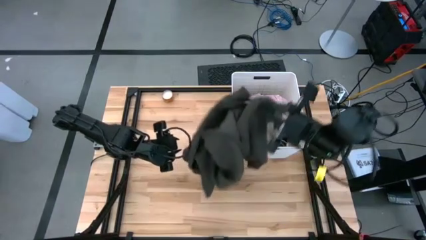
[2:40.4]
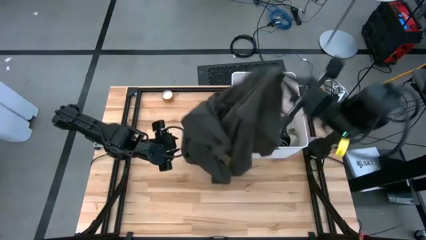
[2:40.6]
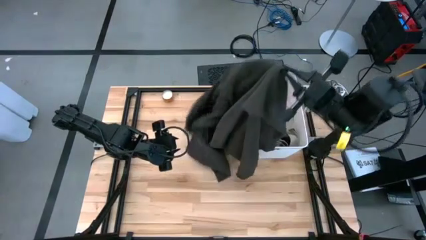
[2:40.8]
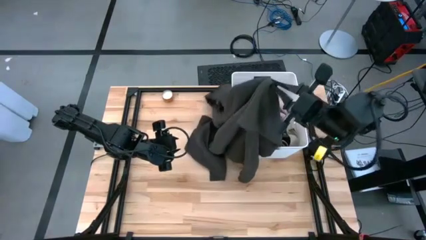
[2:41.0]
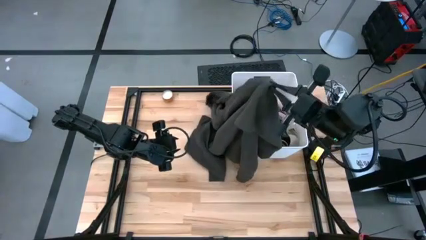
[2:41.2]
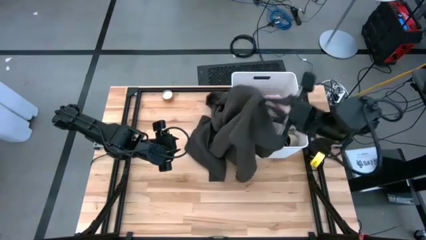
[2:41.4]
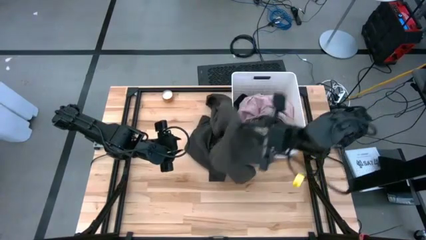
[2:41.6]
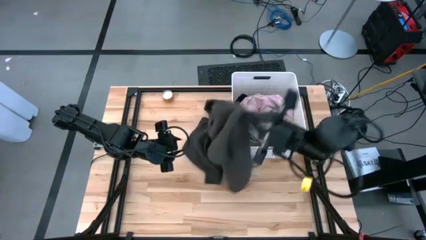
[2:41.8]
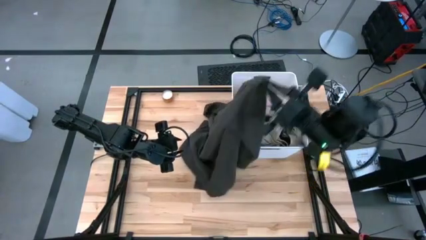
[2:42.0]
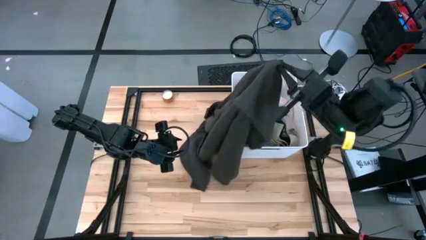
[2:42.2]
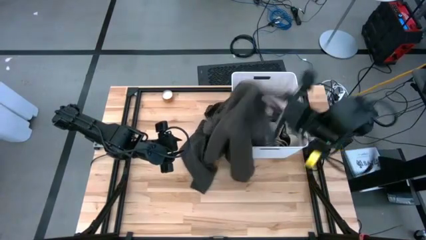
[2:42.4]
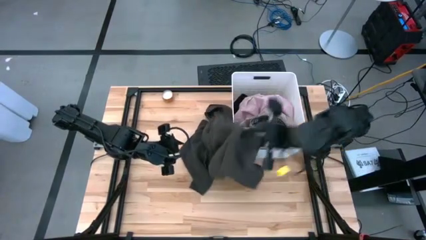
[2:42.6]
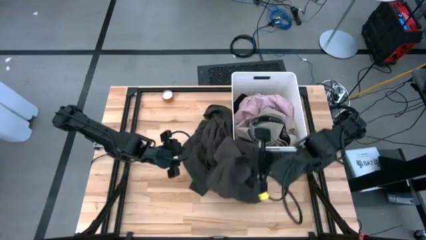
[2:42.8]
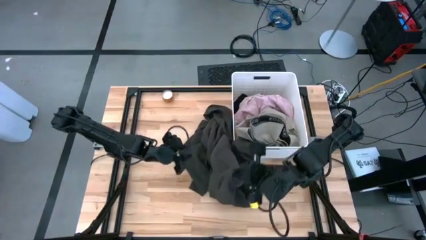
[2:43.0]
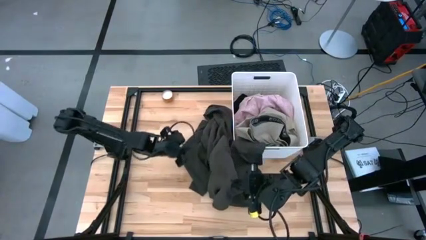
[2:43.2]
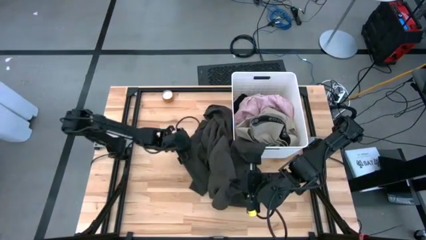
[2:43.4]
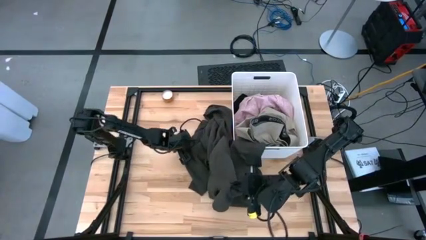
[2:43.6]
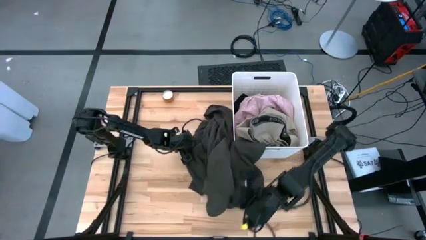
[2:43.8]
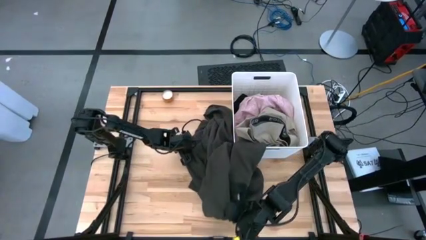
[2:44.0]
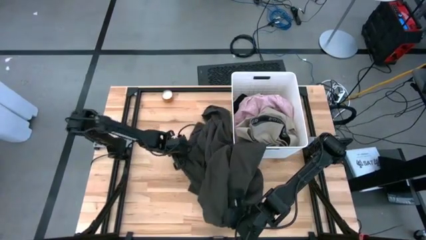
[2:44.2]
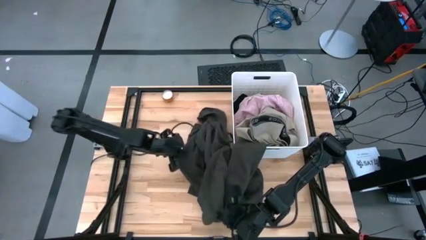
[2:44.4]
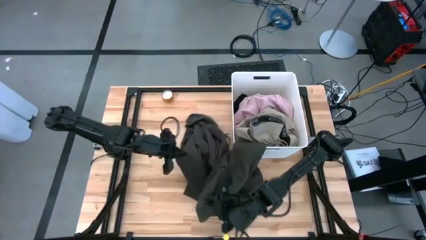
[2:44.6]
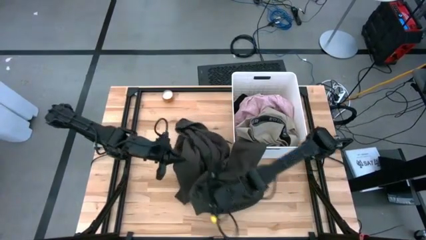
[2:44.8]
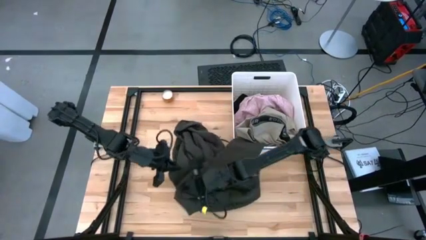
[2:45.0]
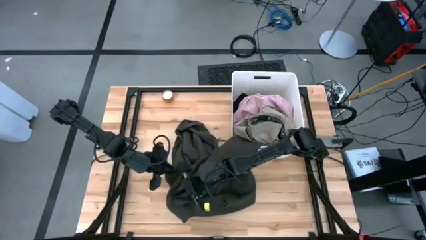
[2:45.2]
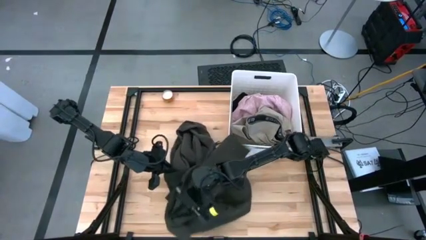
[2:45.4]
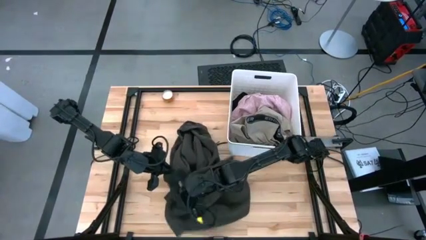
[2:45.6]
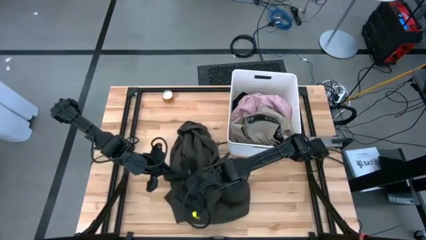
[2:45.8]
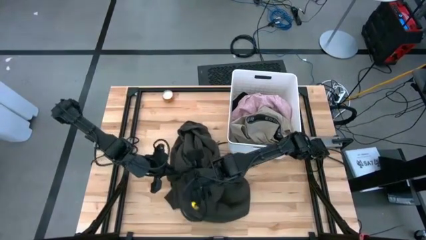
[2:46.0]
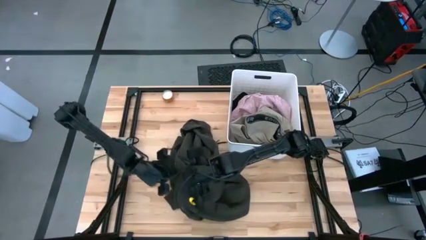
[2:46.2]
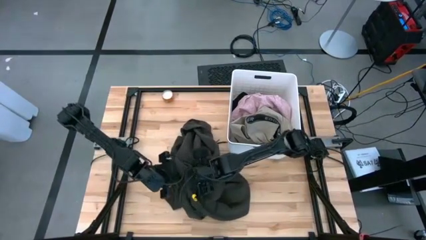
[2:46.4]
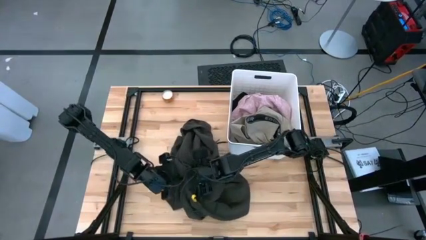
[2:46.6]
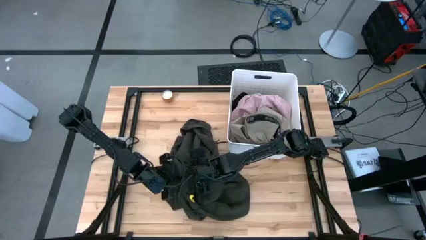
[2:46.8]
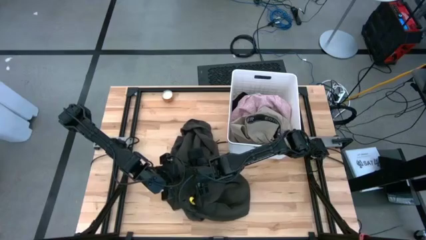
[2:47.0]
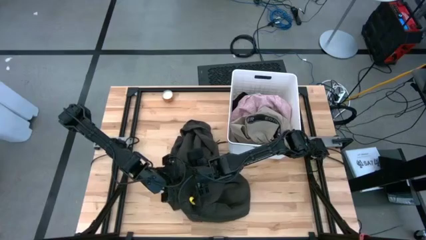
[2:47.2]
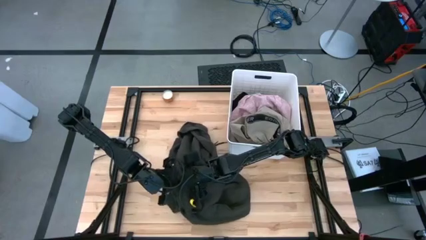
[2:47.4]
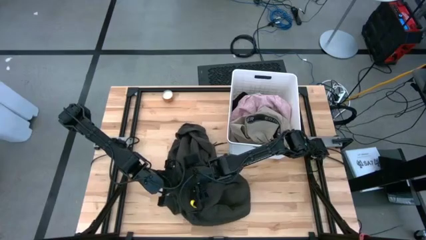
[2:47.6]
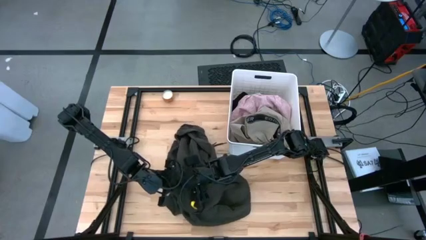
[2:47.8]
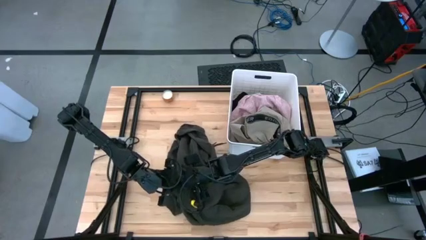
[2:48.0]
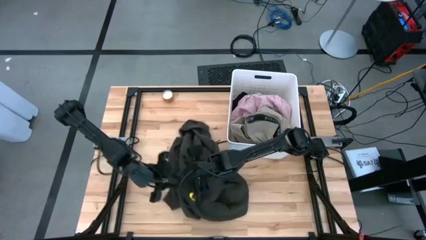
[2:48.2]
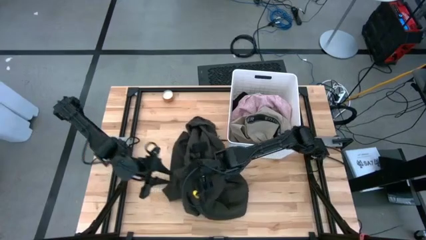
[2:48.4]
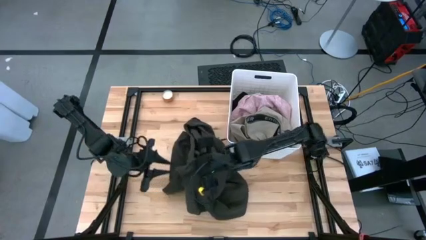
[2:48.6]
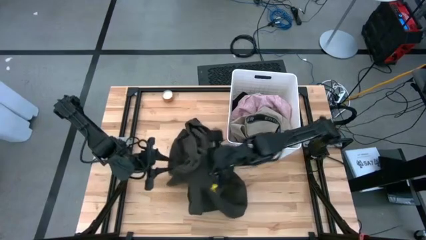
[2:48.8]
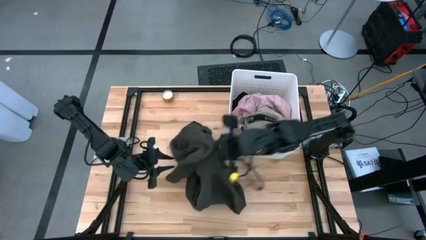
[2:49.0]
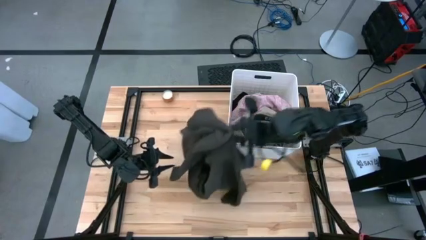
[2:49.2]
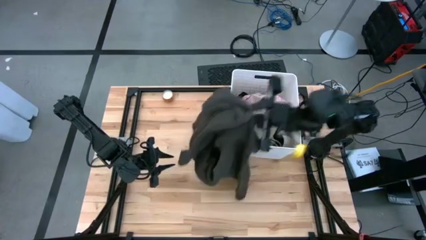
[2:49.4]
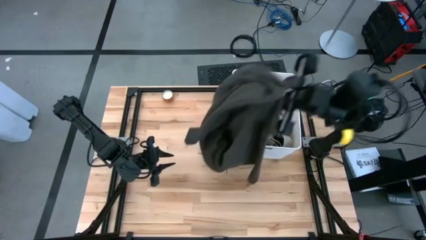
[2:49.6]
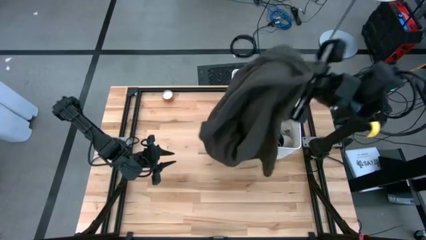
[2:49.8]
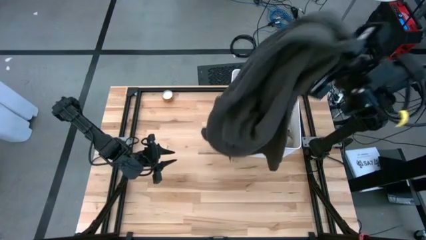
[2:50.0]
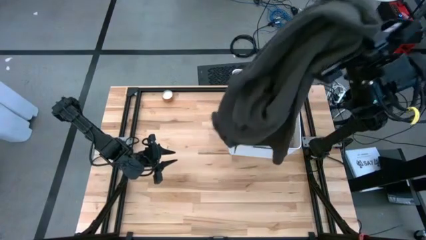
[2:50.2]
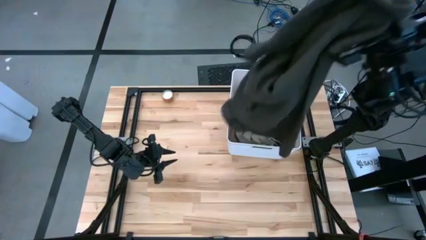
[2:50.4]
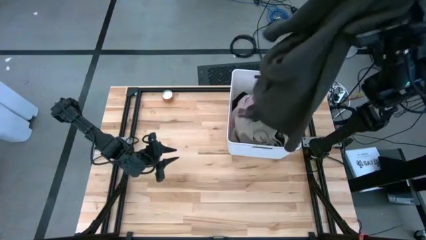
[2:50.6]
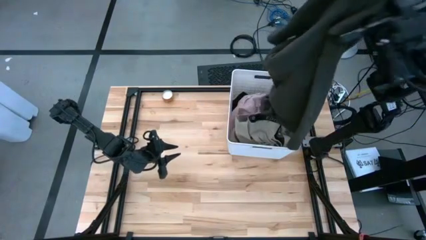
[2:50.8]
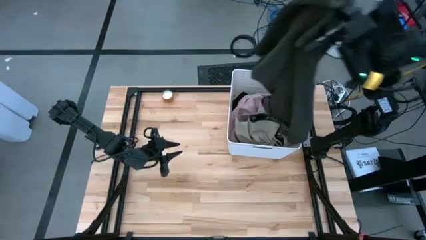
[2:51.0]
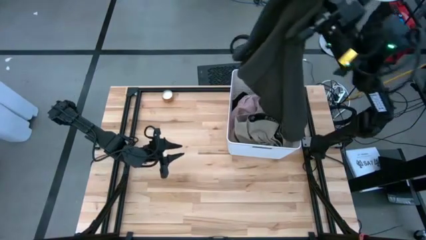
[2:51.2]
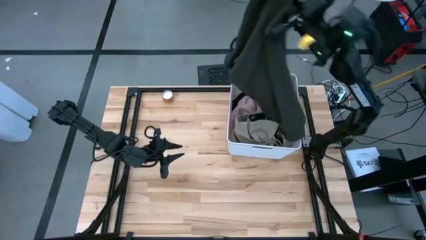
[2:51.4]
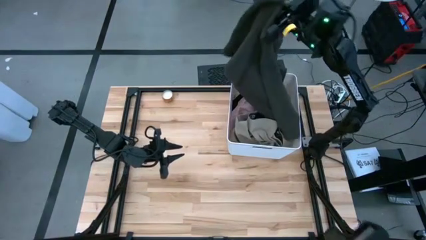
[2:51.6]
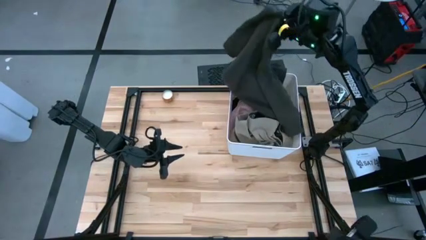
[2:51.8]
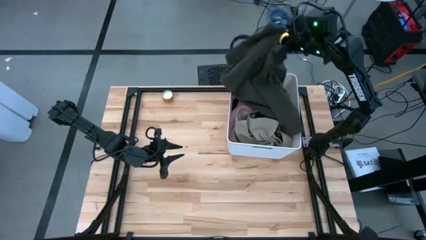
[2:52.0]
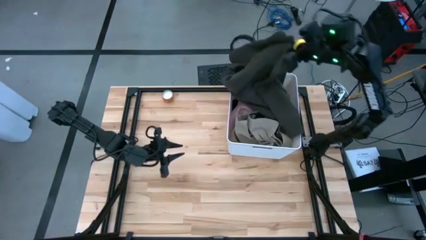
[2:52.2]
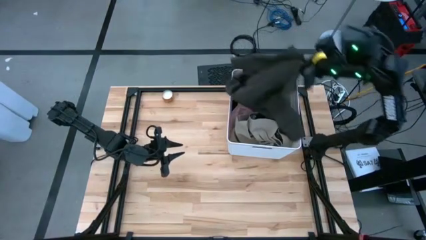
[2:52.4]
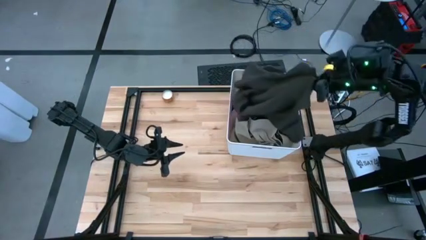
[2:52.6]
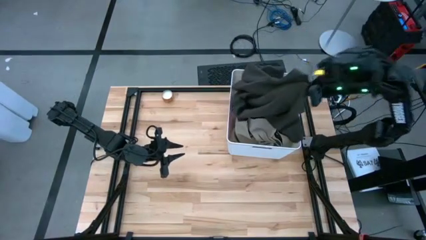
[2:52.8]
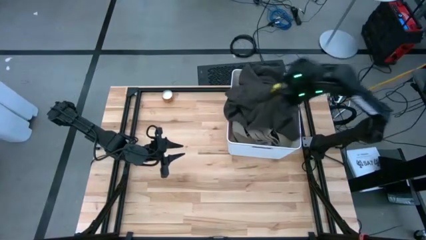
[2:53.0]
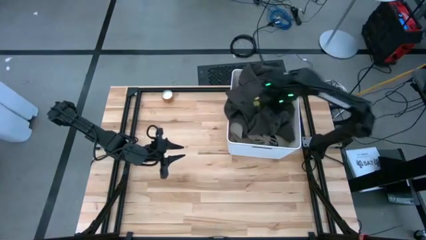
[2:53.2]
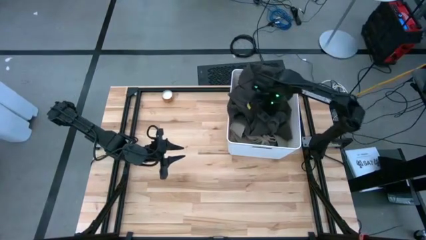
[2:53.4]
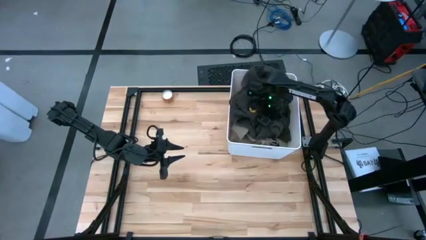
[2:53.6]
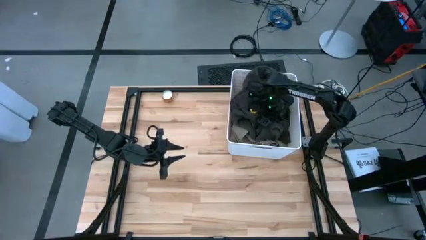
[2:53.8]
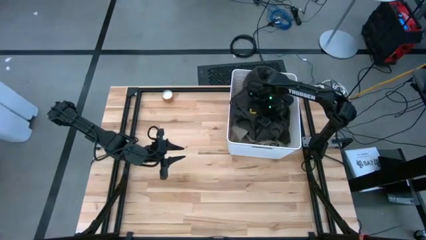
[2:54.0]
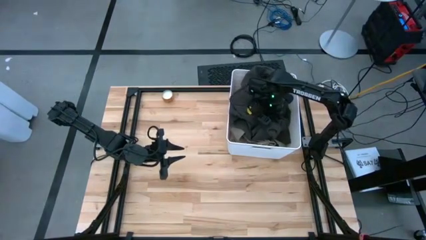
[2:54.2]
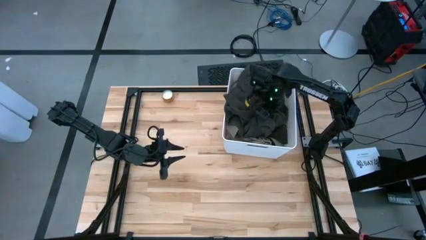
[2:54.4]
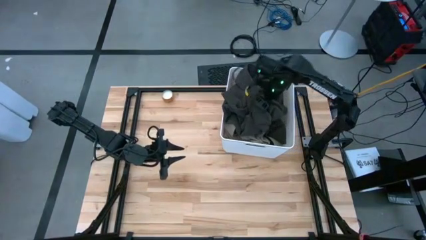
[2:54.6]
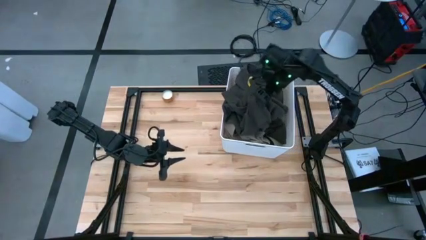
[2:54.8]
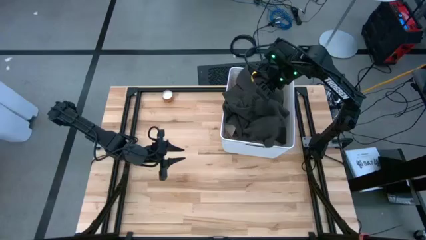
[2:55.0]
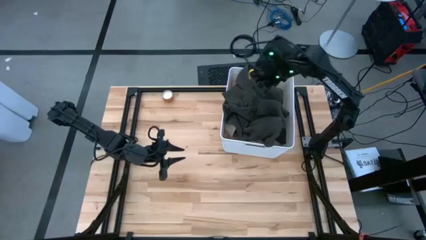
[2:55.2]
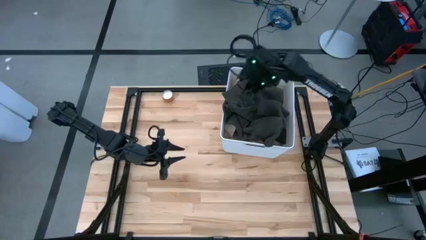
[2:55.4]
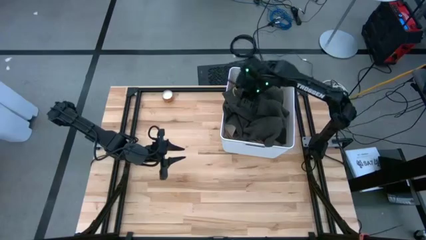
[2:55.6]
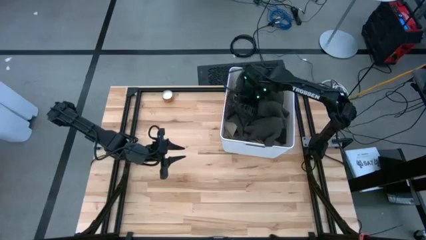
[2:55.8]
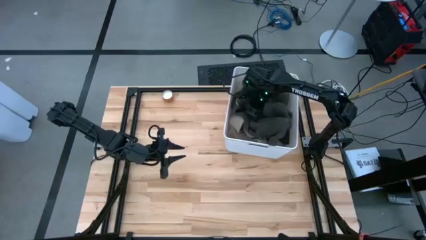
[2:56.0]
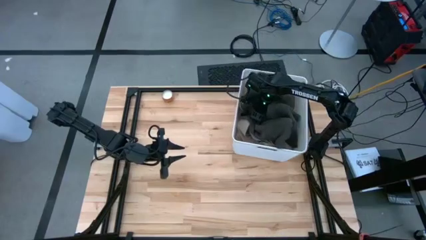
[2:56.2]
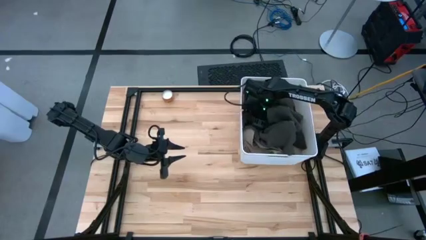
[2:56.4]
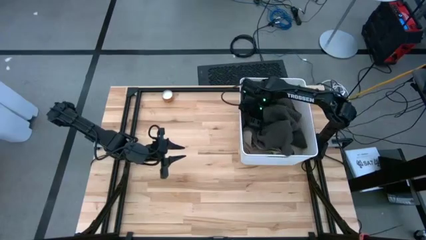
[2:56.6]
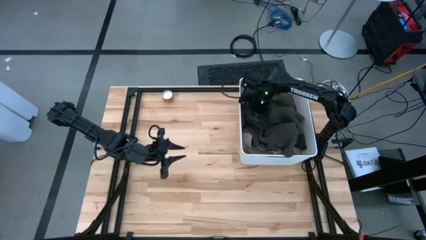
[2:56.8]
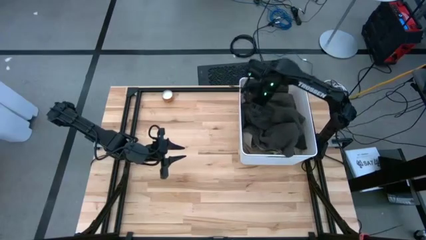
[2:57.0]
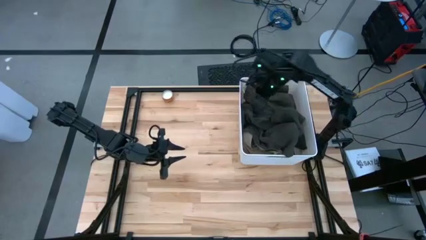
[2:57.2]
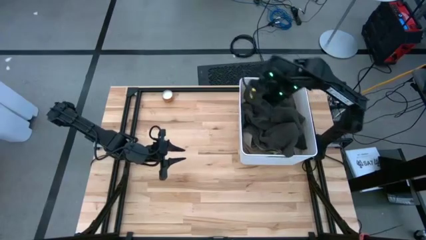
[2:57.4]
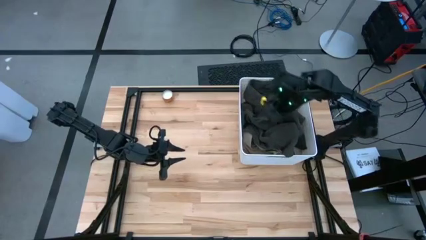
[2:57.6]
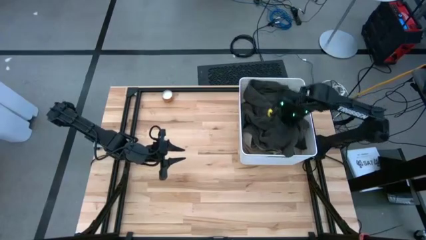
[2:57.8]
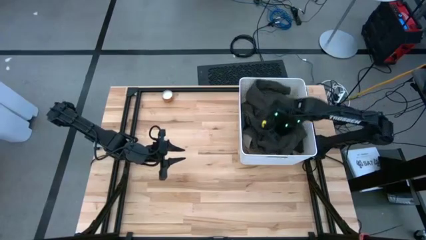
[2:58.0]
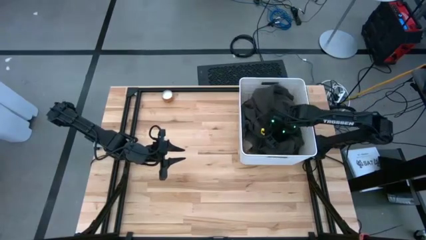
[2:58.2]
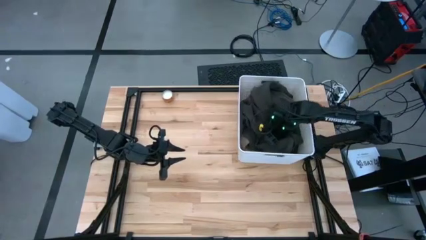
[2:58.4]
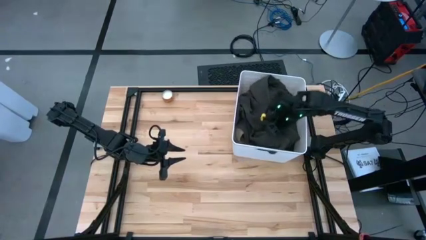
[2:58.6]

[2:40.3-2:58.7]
Task: Sort clothes
Put the black jacket into the laundry bin
